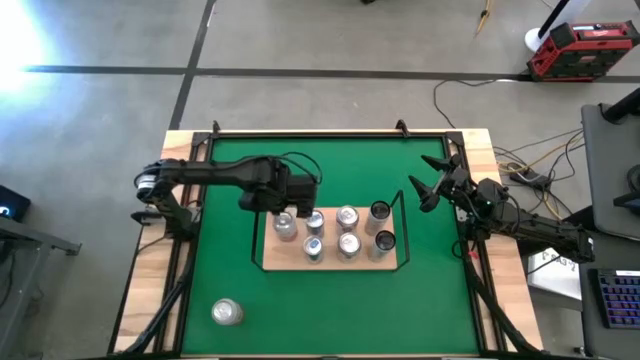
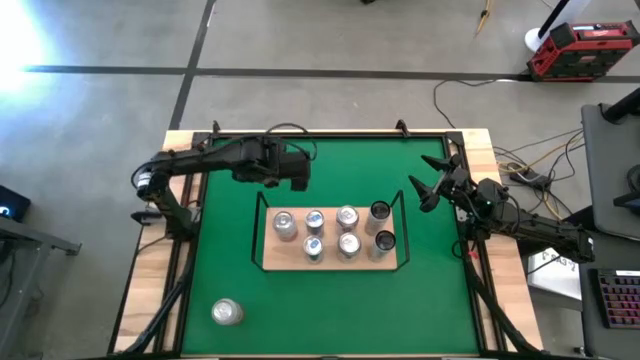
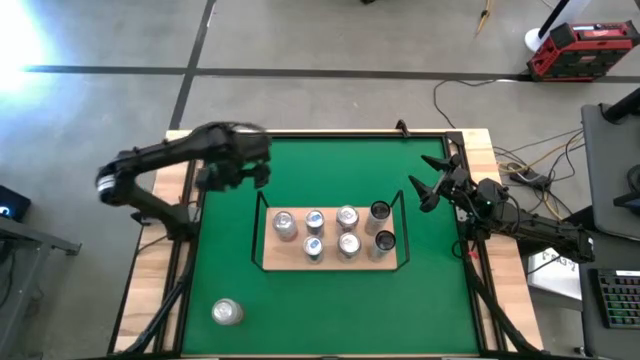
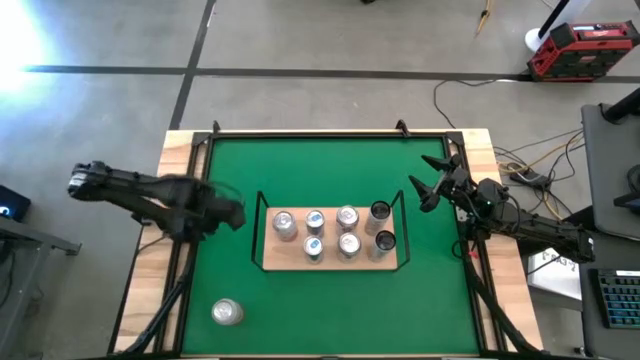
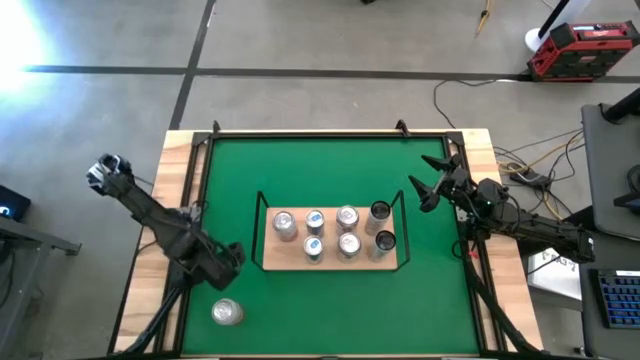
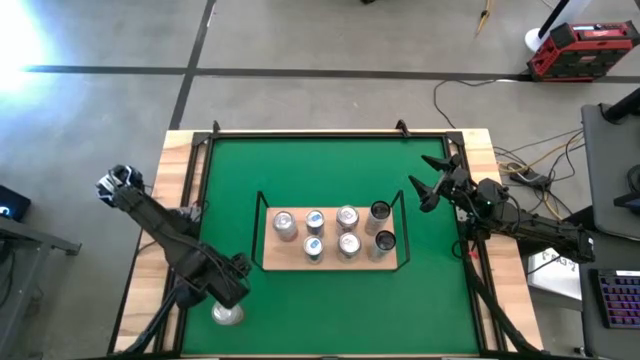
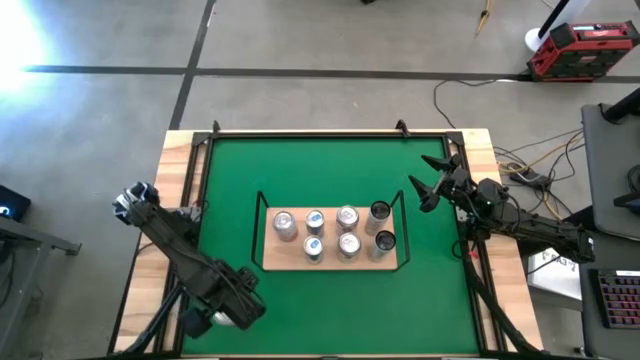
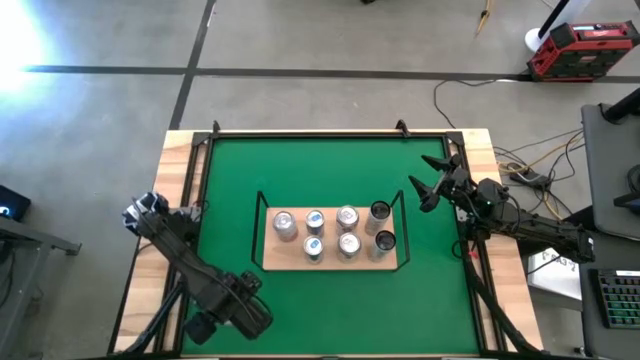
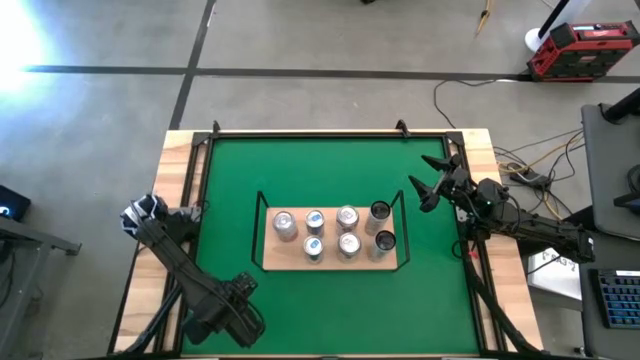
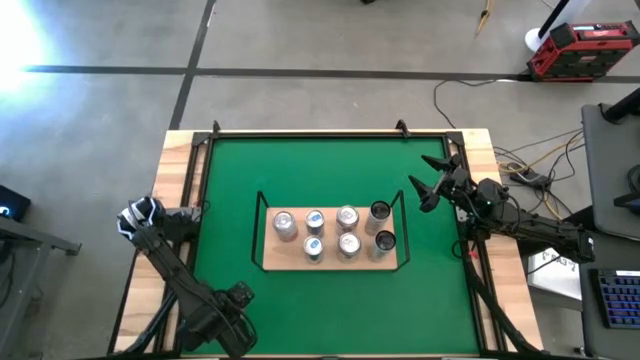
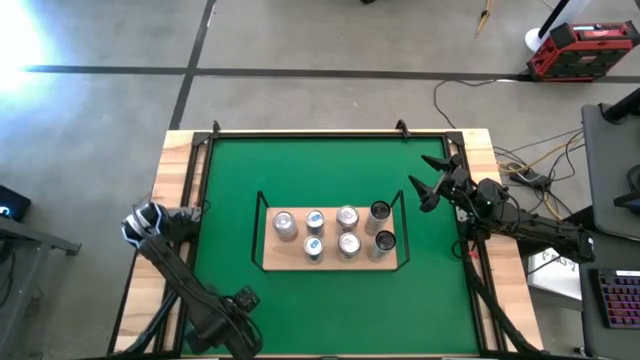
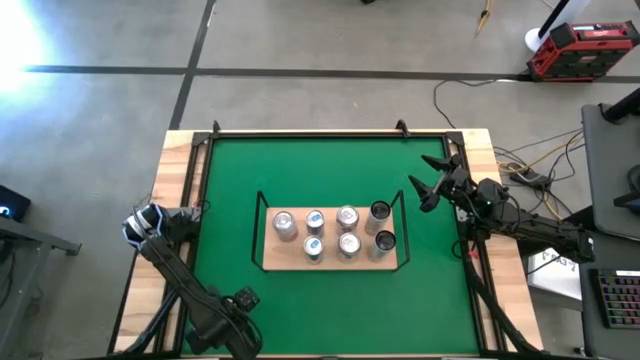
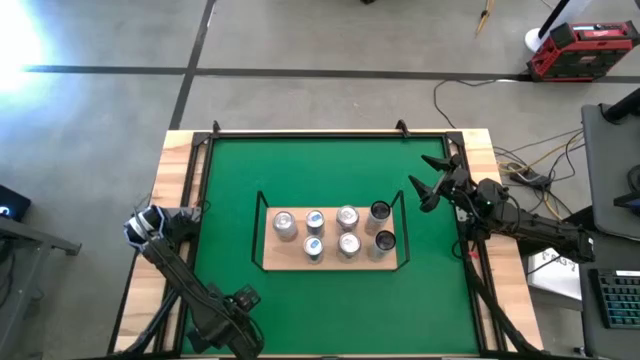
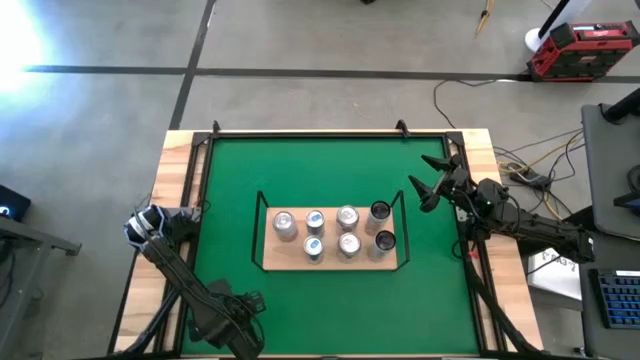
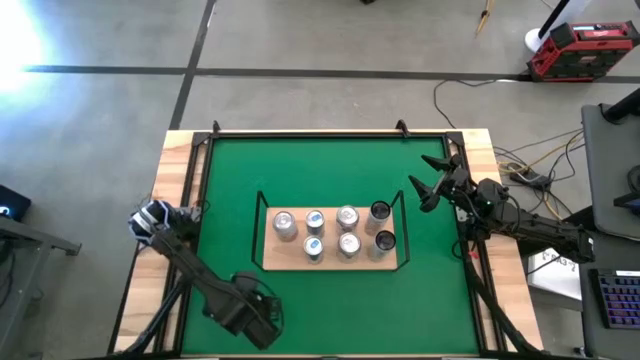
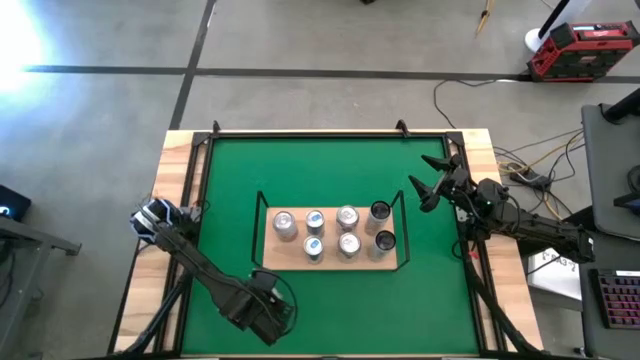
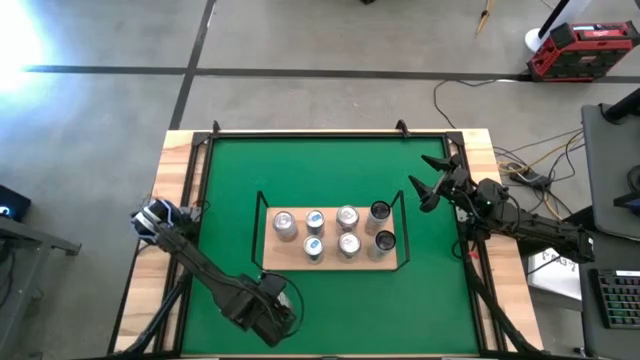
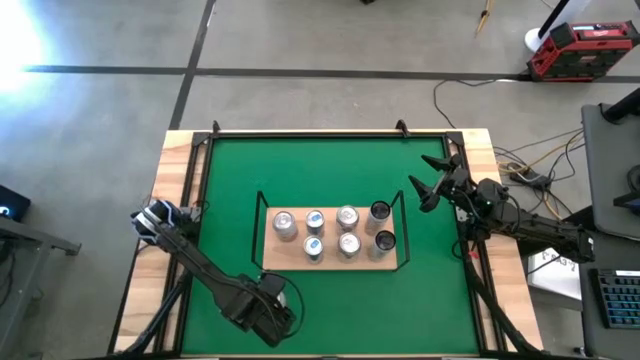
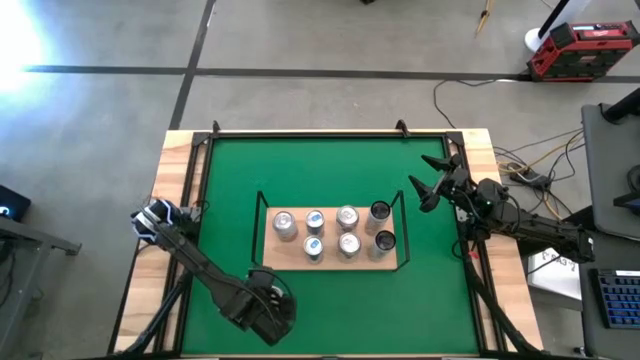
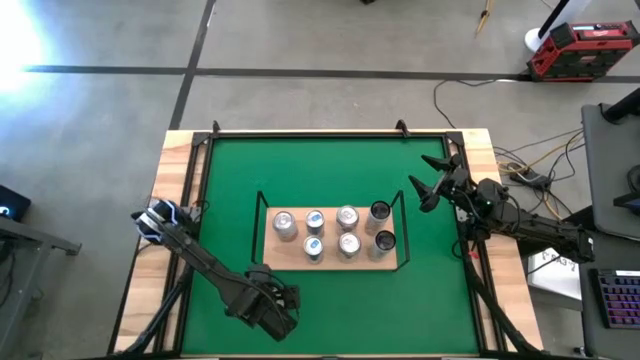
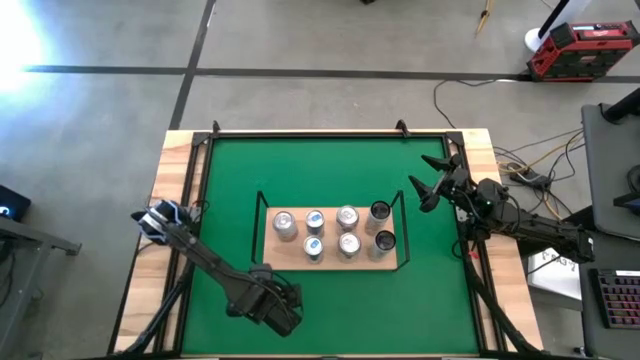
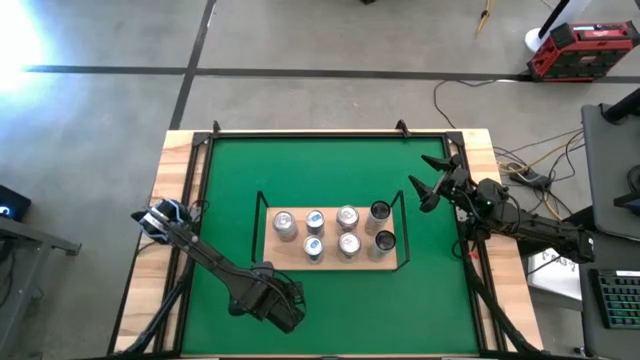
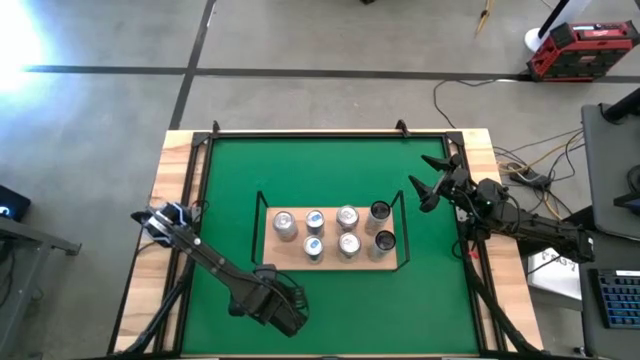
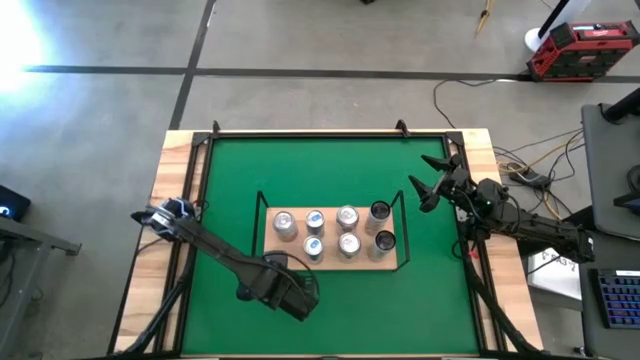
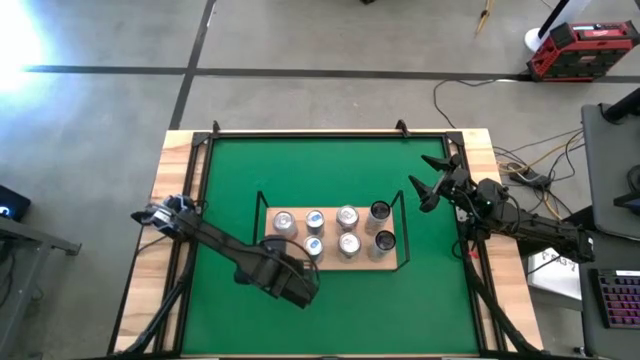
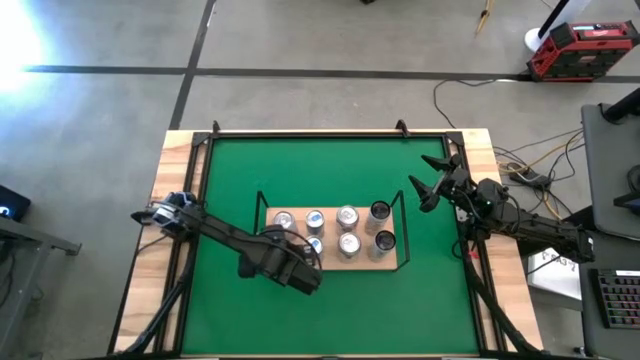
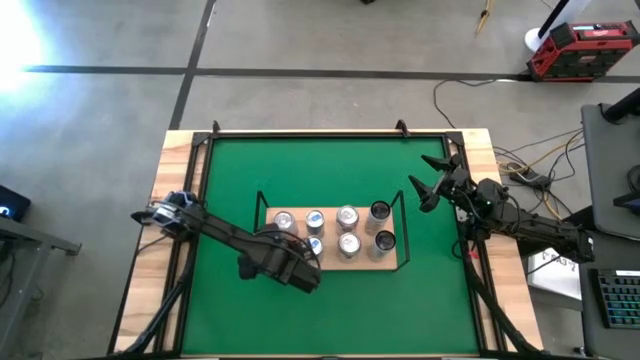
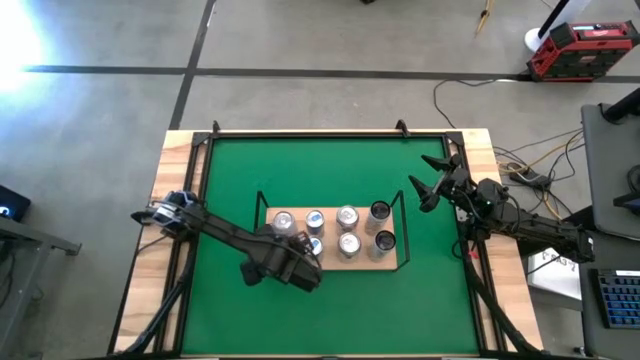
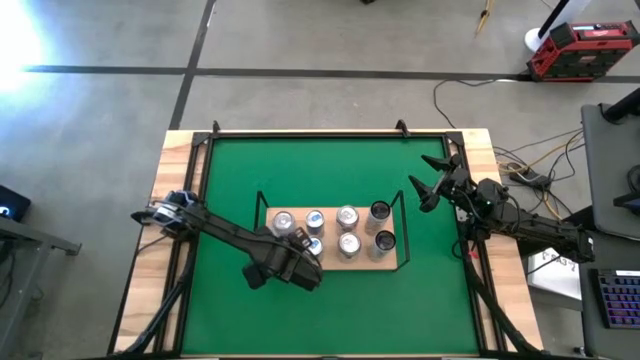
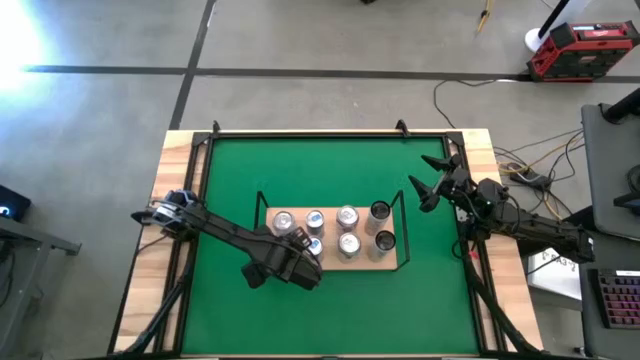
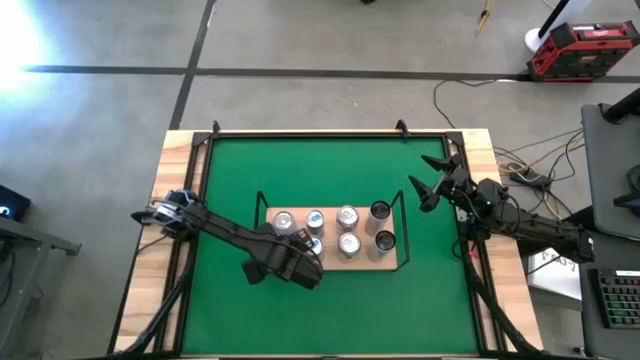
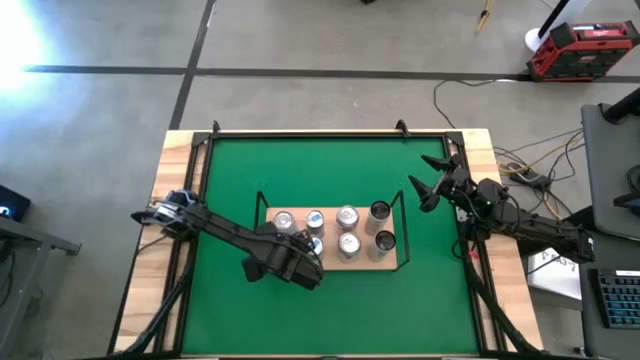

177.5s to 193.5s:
Task: Place canned beverage on shelf
Put the white-pink soda can on the shelf and align with the other white-pink soda can

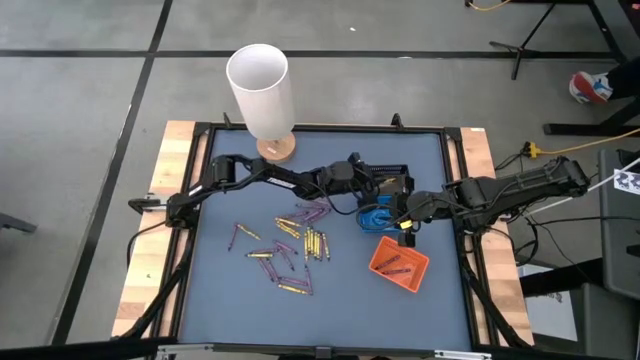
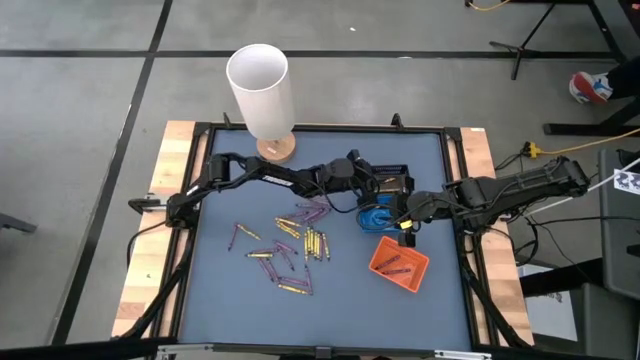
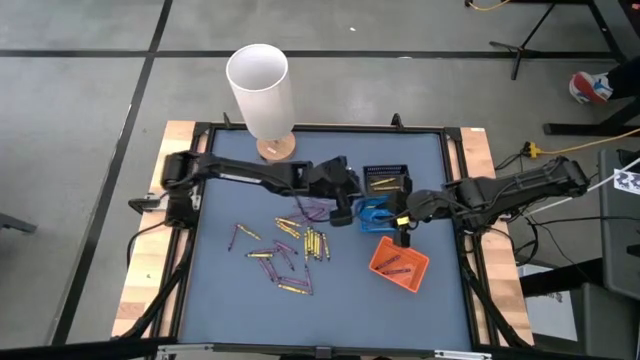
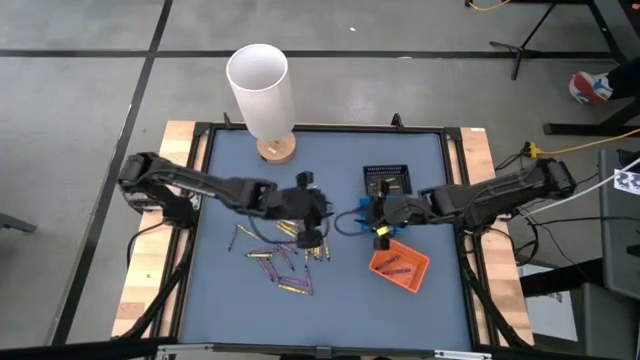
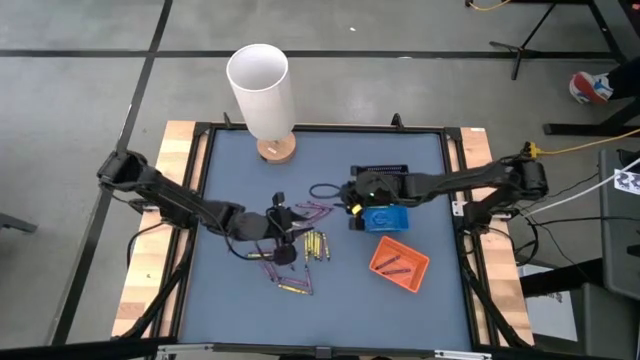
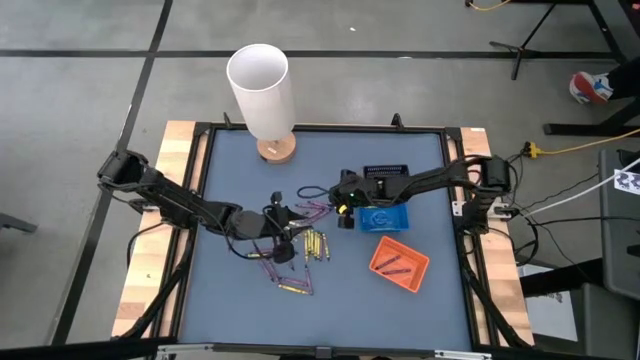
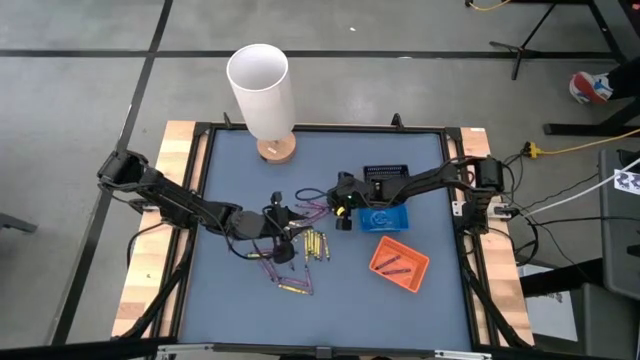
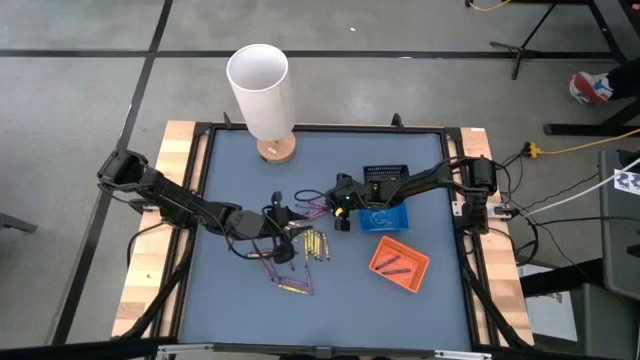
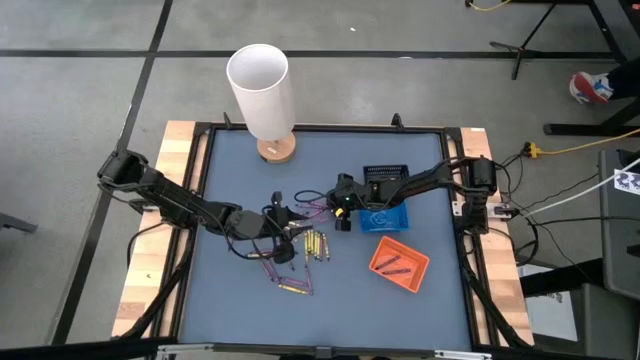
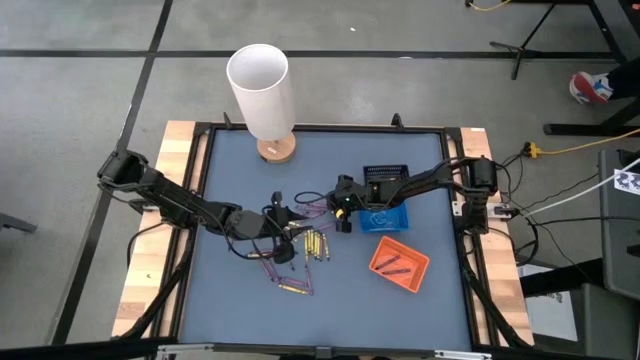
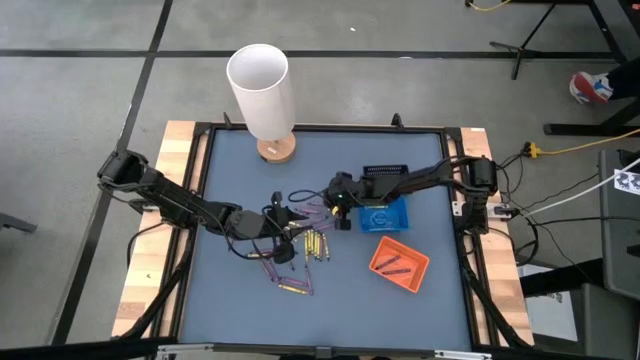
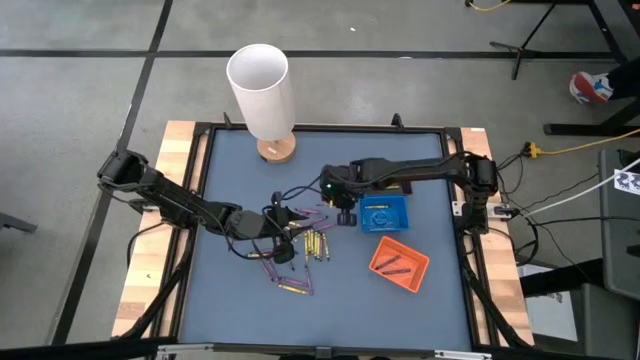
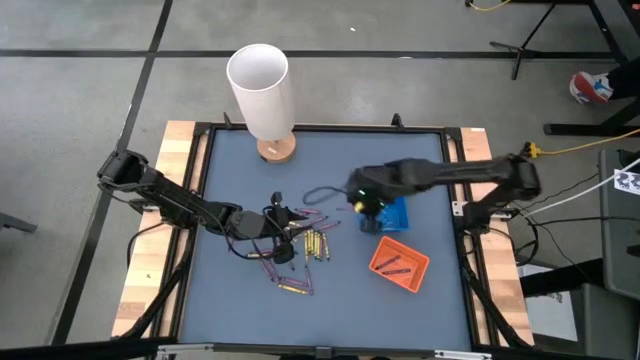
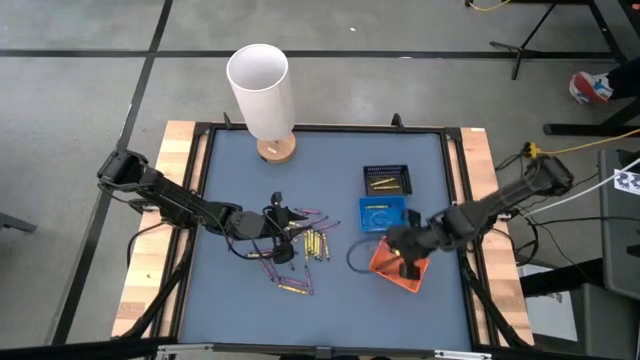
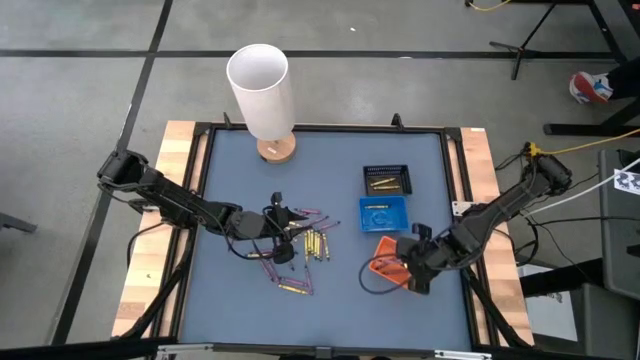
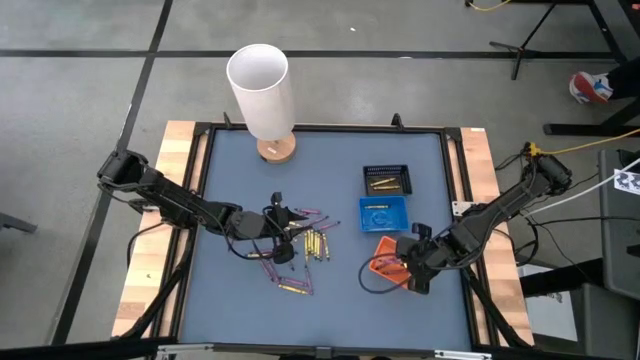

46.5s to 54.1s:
Task: Sort crayons
Put the purple crayon into the orange bin
